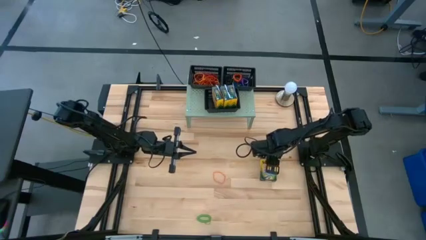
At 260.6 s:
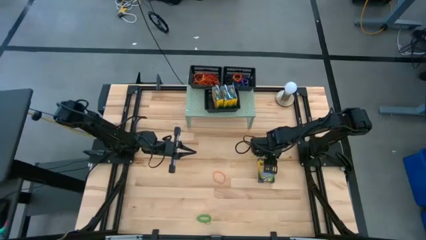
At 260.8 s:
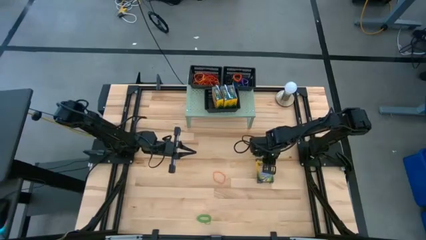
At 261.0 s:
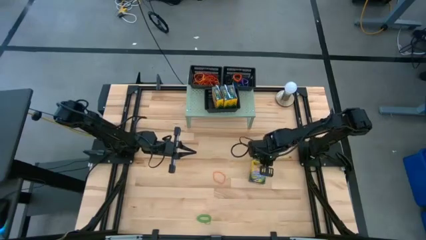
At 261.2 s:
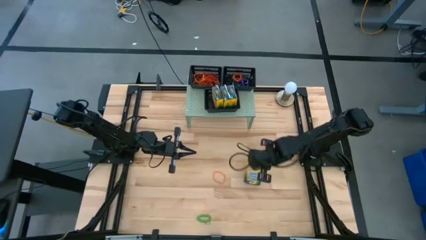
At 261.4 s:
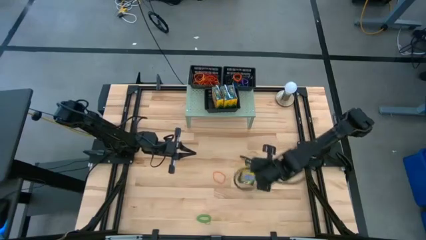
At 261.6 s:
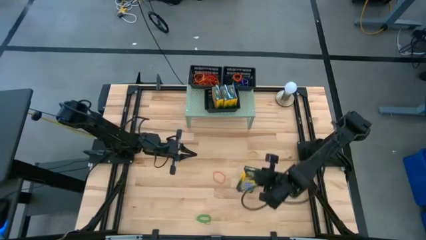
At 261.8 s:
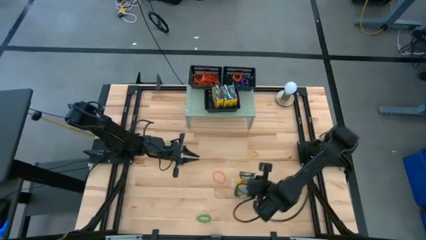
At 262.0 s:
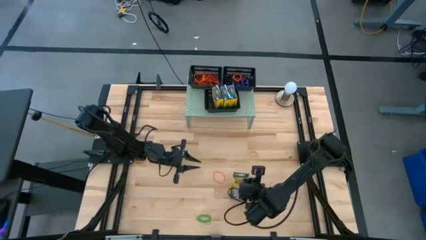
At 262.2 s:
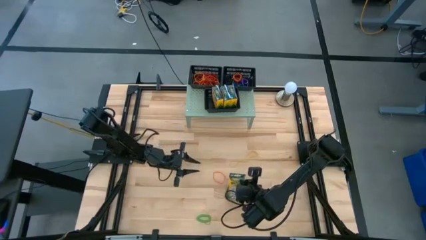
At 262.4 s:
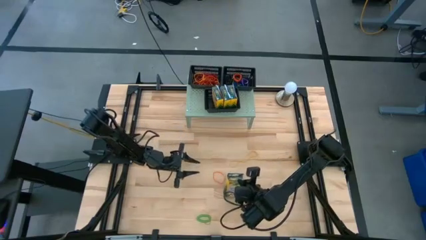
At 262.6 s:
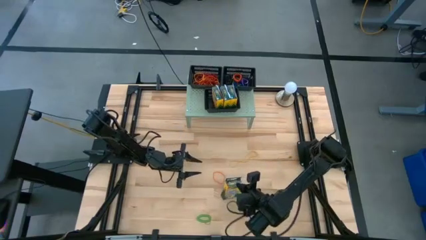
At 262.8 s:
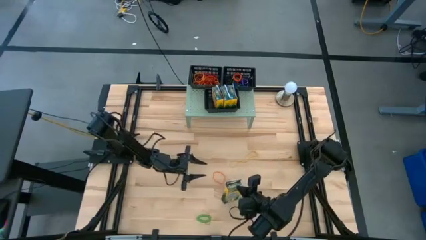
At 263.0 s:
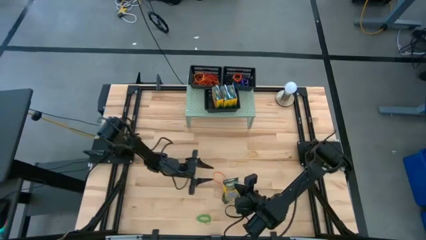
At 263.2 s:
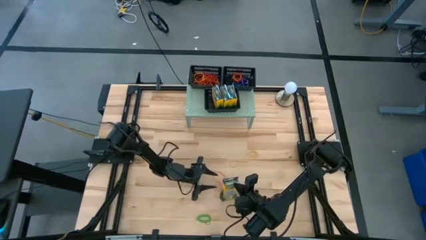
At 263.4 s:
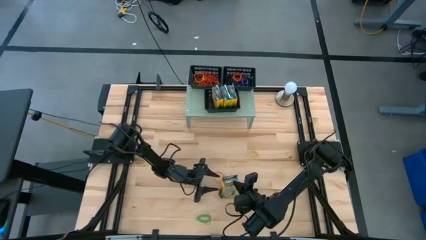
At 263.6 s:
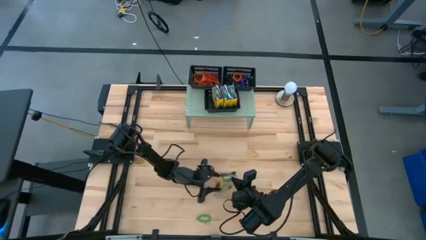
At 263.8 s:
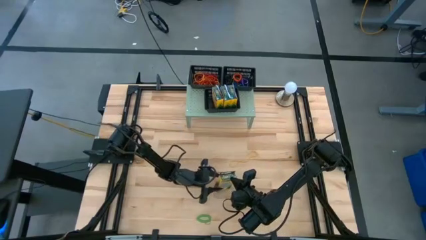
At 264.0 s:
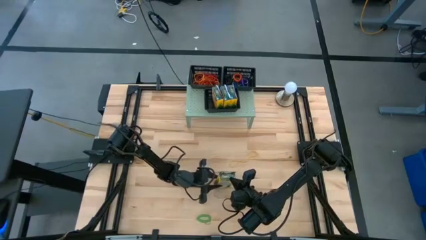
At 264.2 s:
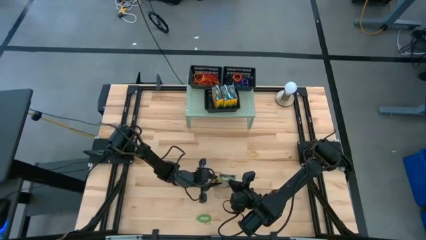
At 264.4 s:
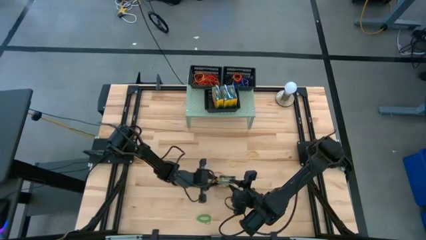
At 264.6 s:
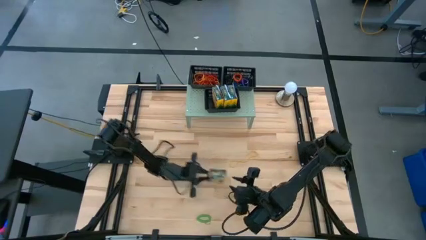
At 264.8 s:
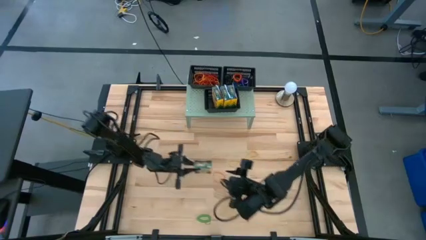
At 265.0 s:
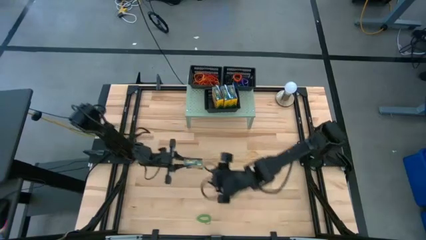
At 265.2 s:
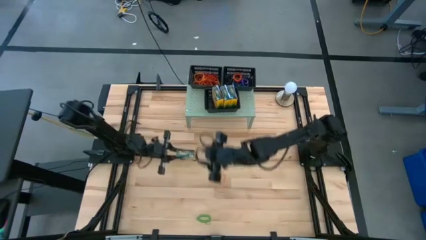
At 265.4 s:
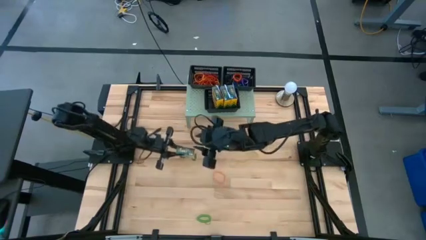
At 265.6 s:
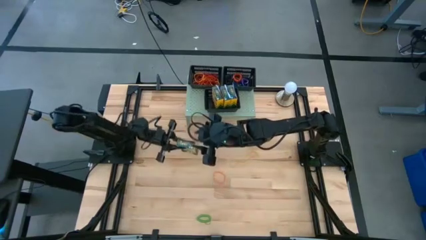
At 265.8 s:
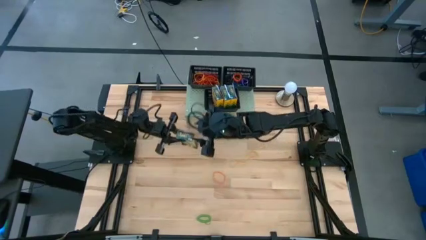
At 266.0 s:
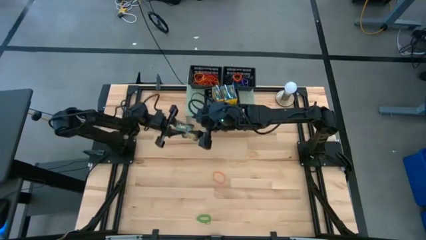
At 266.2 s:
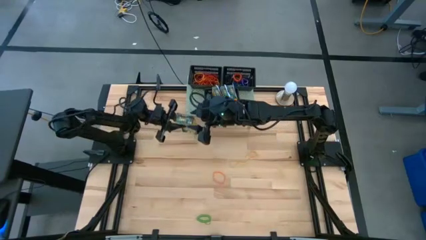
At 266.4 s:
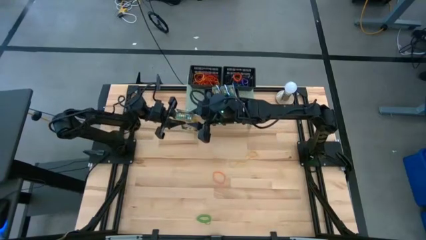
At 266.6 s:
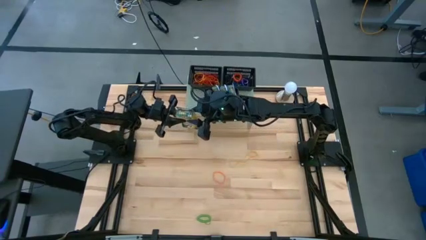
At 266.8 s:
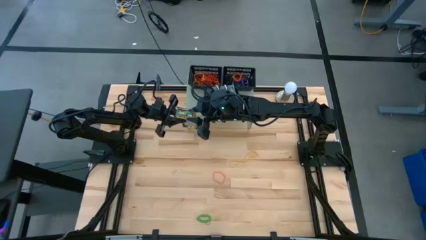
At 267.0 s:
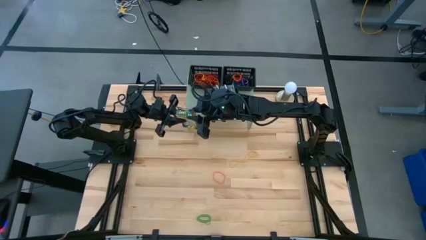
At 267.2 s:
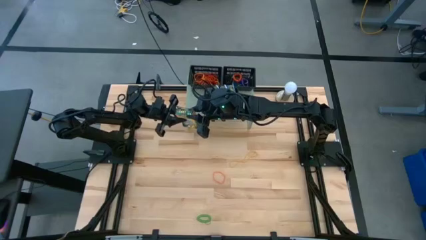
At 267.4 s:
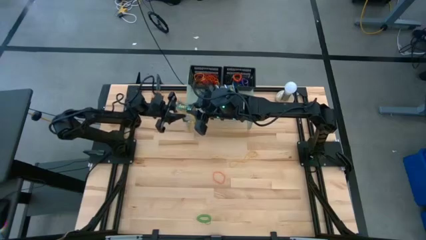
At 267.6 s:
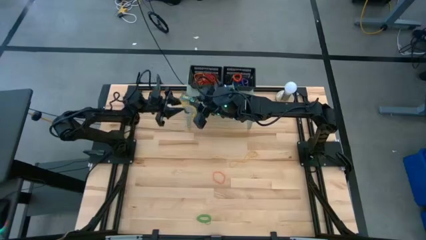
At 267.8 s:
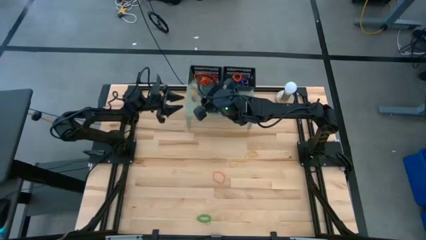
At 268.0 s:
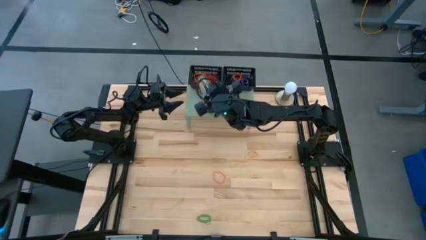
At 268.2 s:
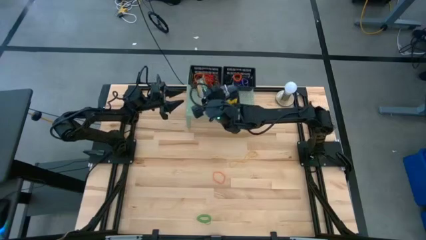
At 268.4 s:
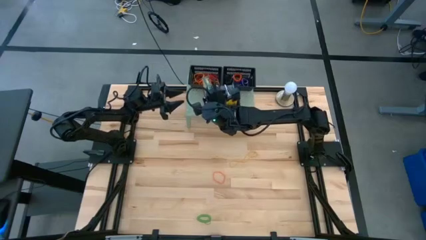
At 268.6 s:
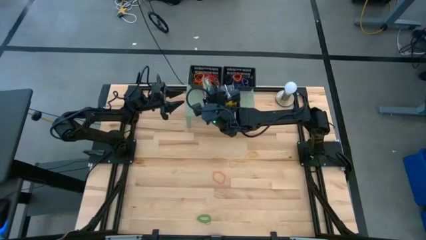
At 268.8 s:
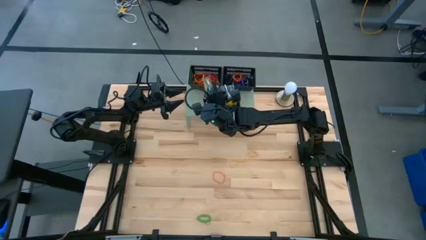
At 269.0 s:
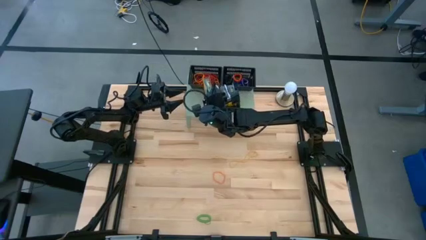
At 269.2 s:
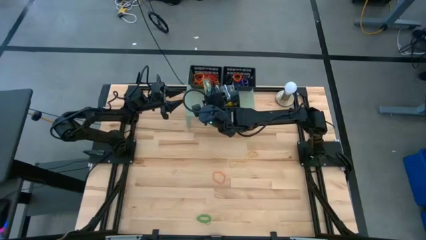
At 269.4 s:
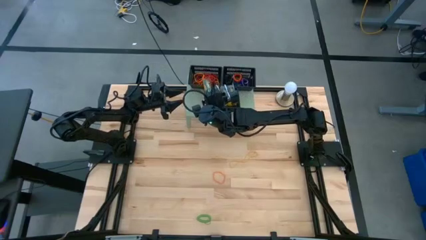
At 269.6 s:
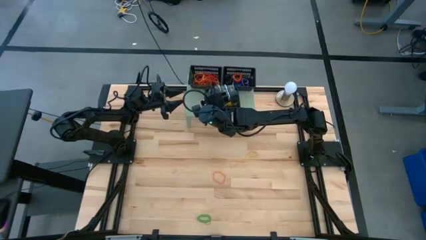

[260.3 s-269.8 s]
Task: Pick & Place Office Desk Supplies
Put the yellow crayon box into the bottom black bin

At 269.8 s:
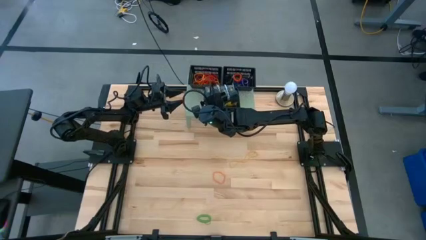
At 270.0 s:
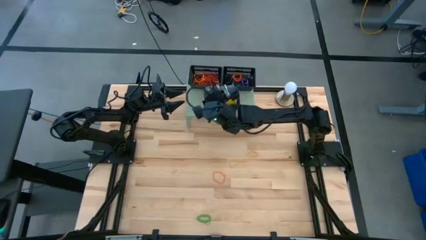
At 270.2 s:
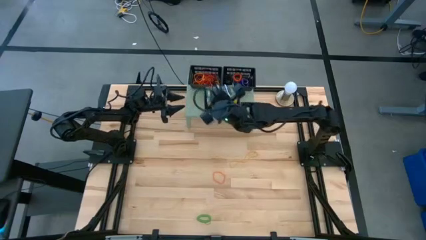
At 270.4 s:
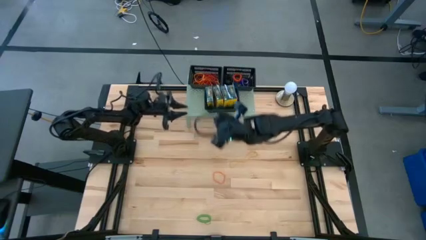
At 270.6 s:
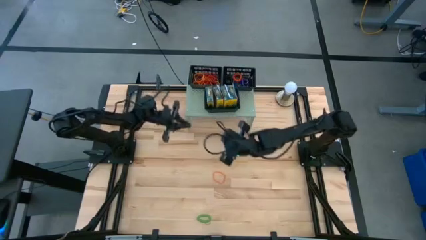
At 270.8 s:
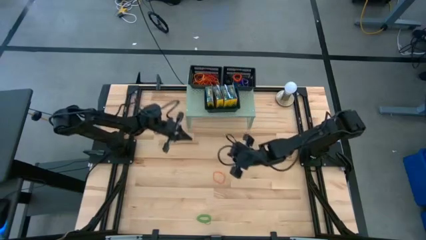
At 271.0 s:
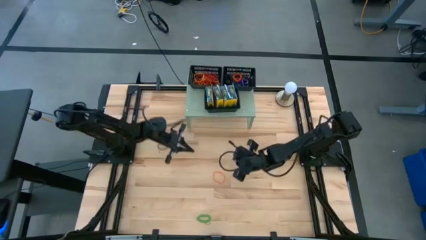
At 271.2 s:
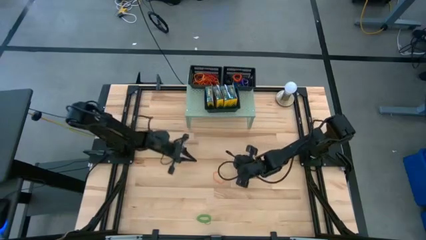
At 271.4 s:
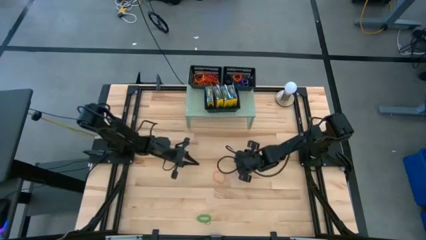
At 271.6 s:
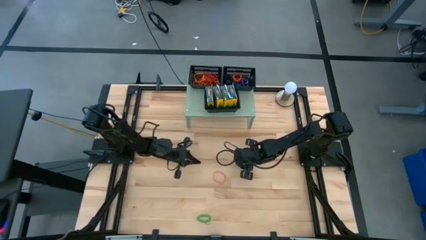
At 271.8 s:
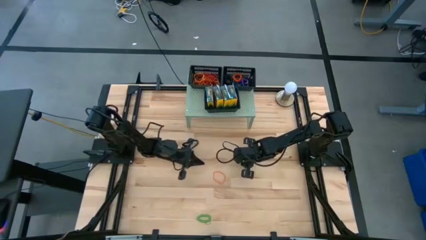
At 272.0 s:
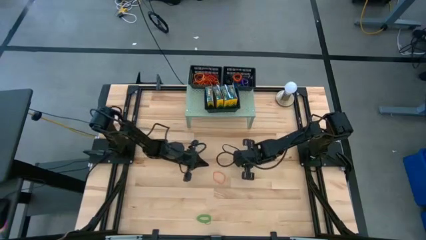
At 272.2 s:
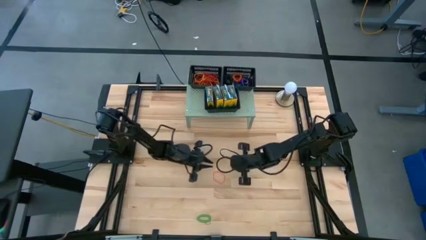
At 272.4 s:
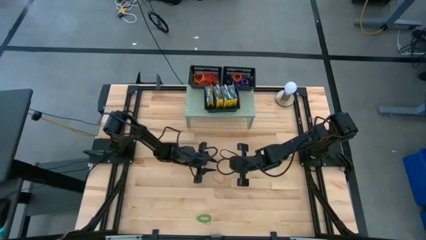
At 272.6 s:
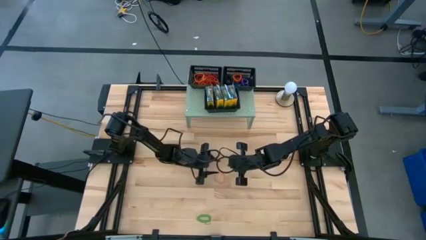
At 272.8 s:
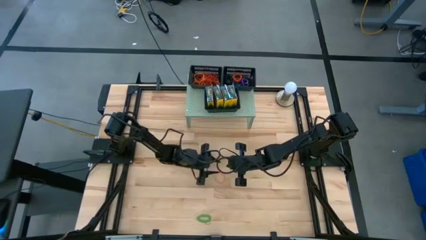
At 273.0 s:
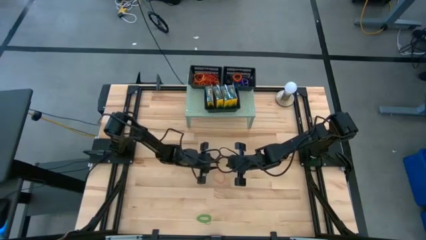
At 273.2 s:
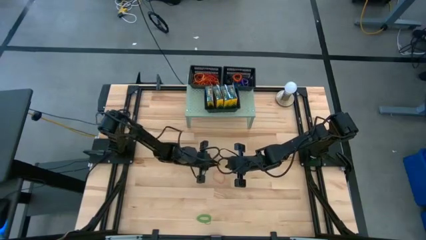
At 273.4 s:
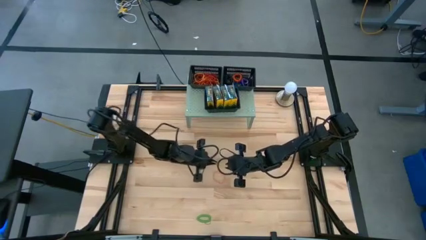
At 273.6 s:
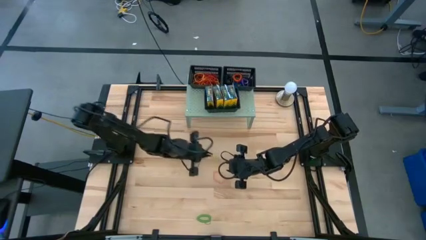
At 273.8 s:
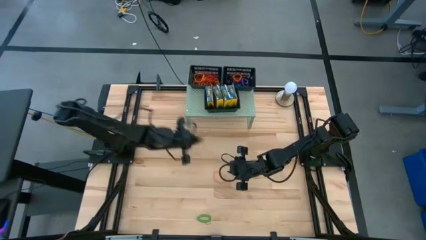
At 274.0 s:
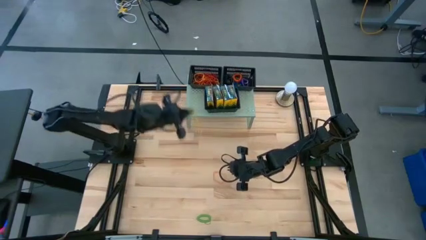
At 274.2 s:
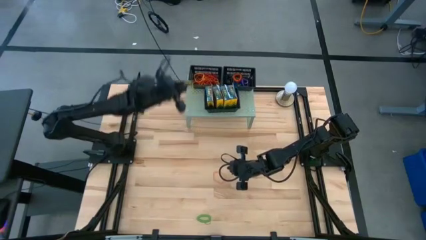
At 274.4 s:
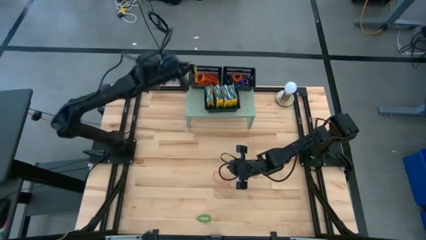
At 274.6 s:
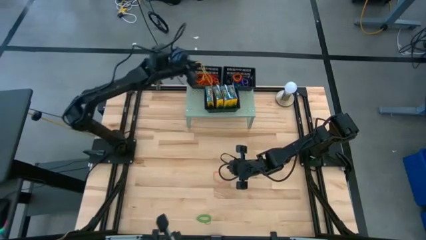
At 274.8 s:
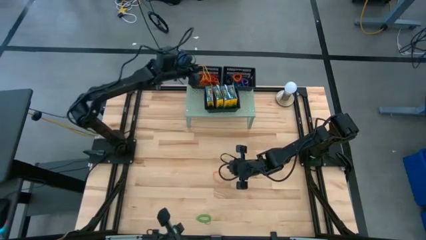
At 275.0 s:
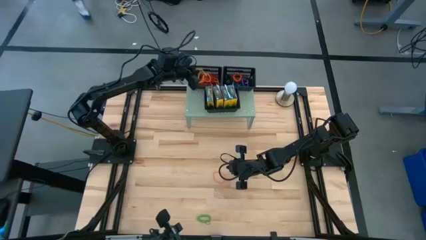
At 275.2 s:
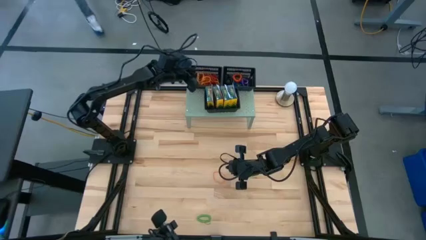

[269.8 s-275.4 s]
Put the yellow rubberband into the top left black bin
